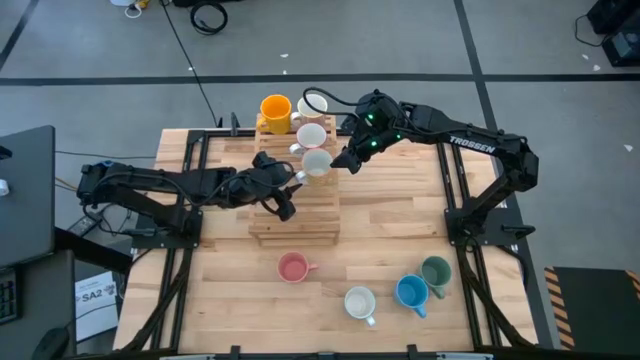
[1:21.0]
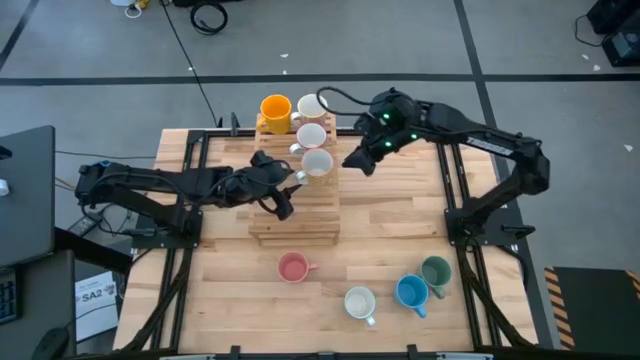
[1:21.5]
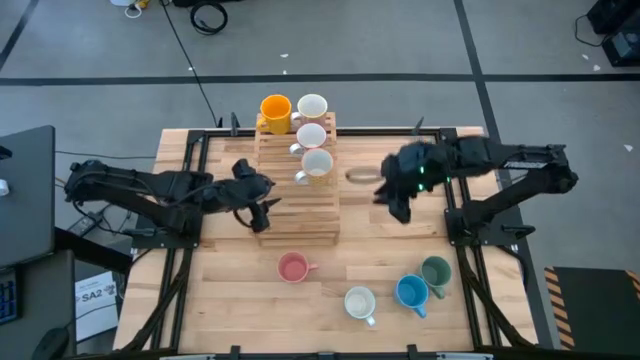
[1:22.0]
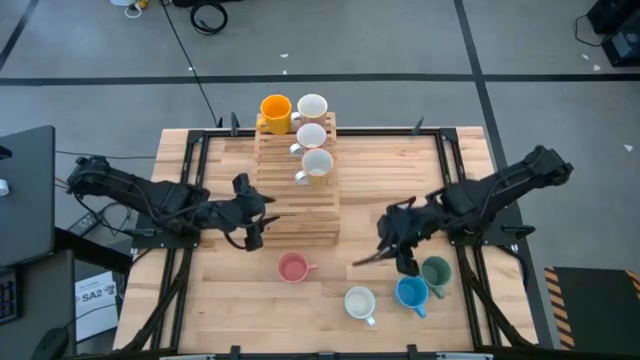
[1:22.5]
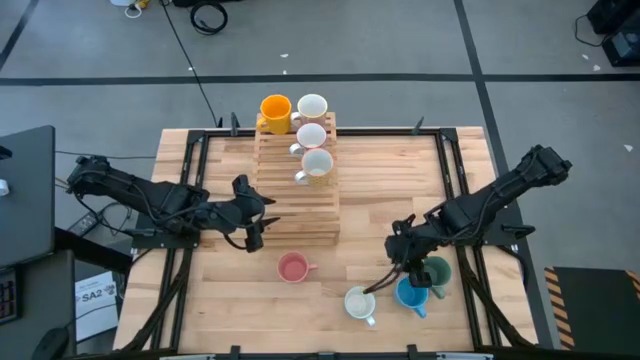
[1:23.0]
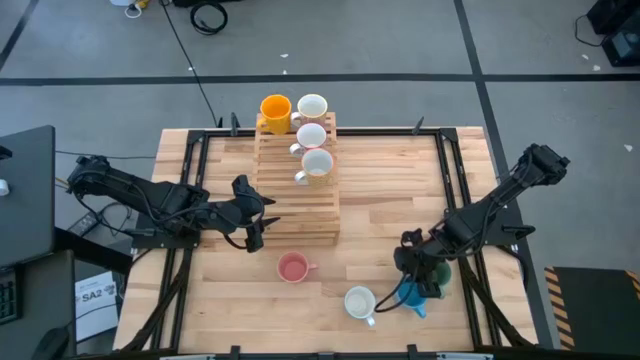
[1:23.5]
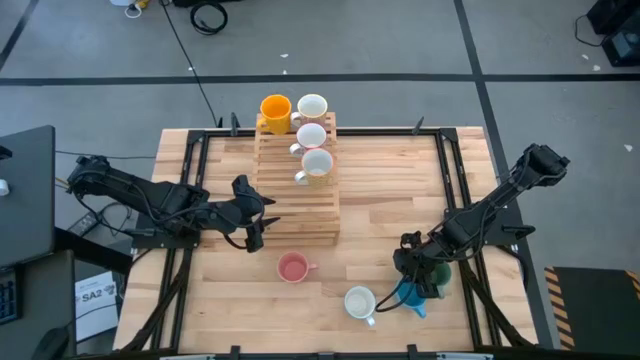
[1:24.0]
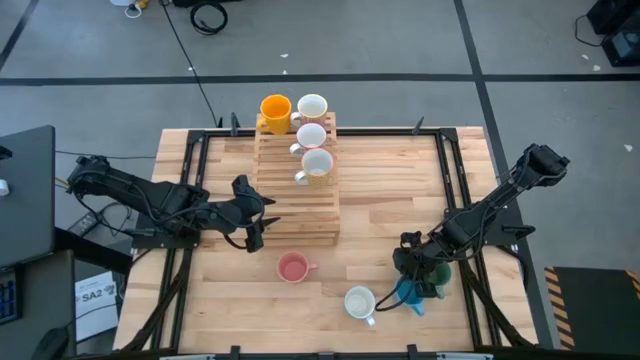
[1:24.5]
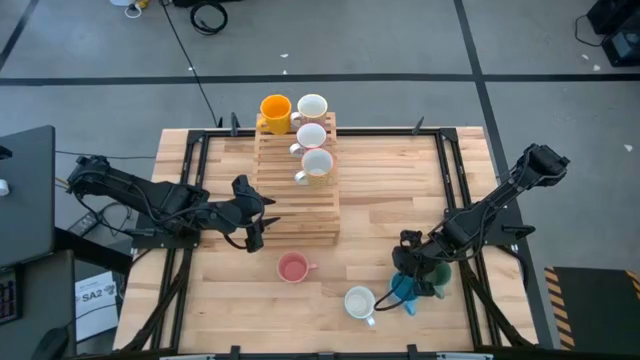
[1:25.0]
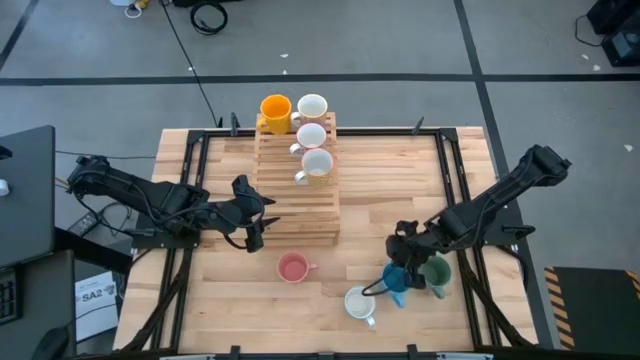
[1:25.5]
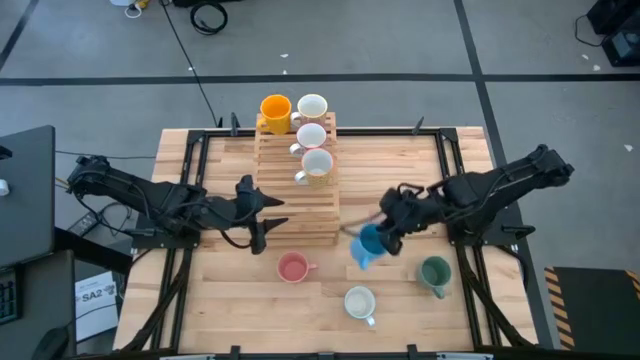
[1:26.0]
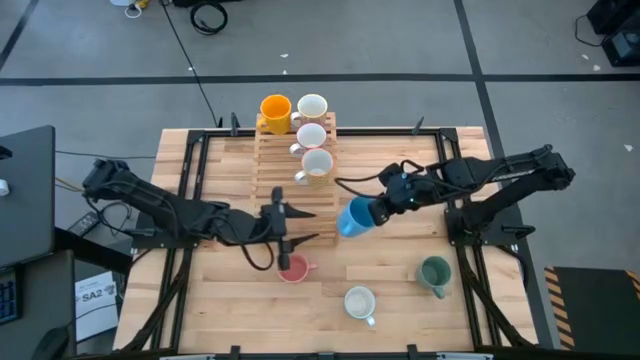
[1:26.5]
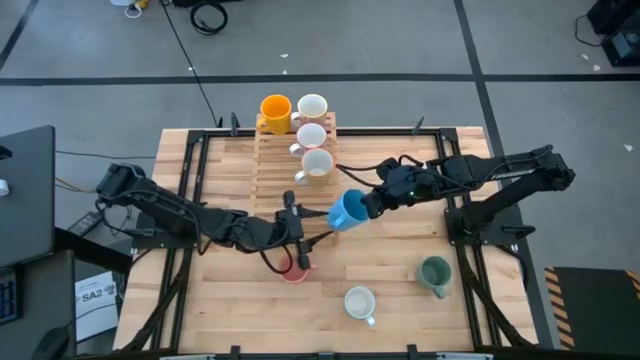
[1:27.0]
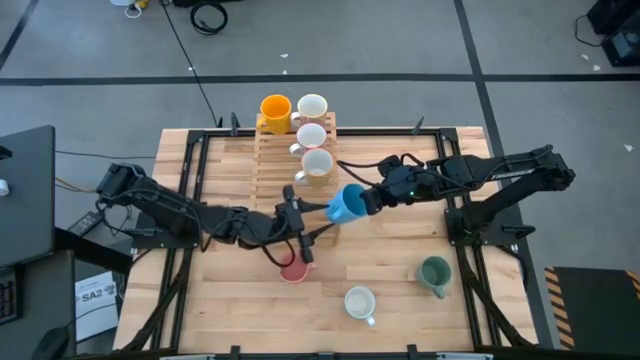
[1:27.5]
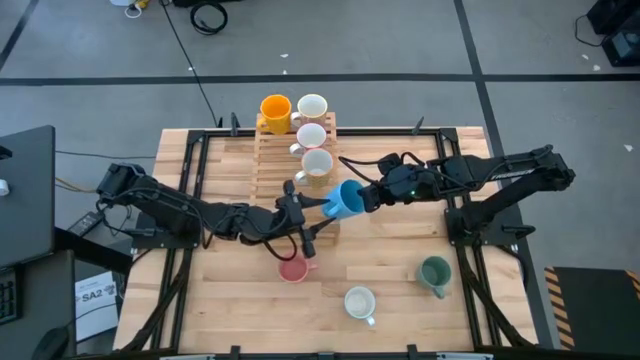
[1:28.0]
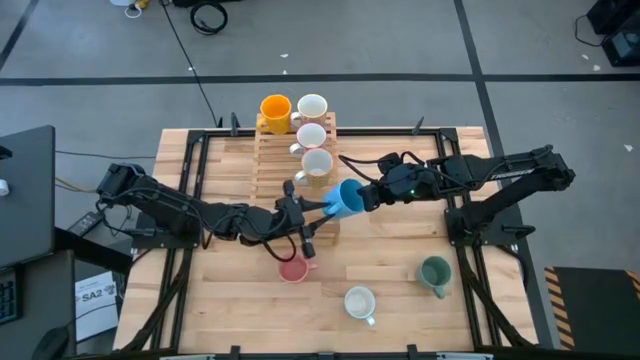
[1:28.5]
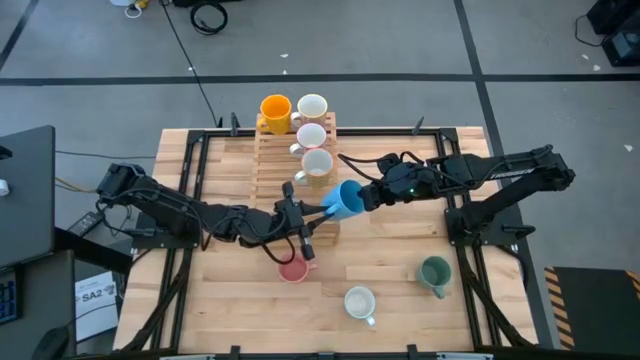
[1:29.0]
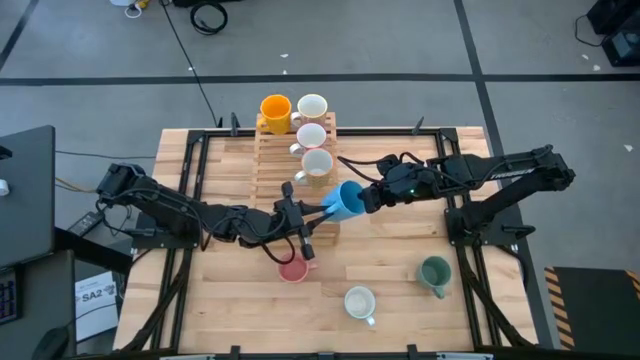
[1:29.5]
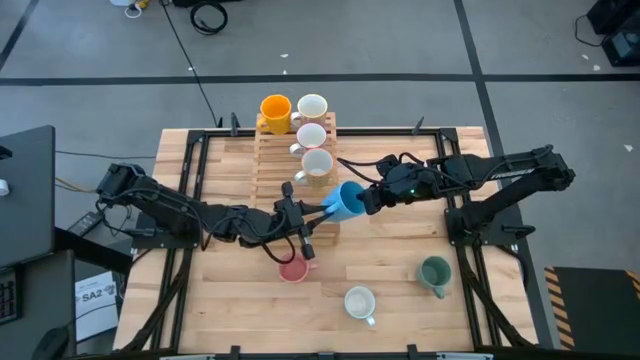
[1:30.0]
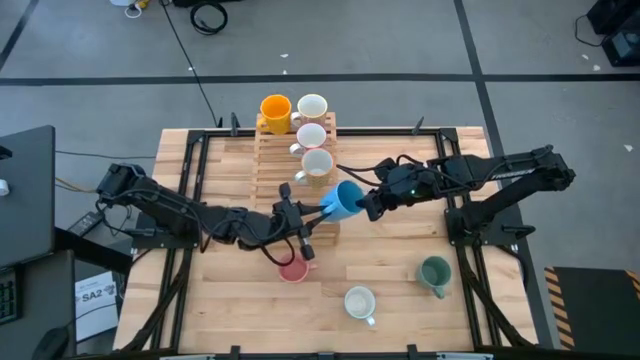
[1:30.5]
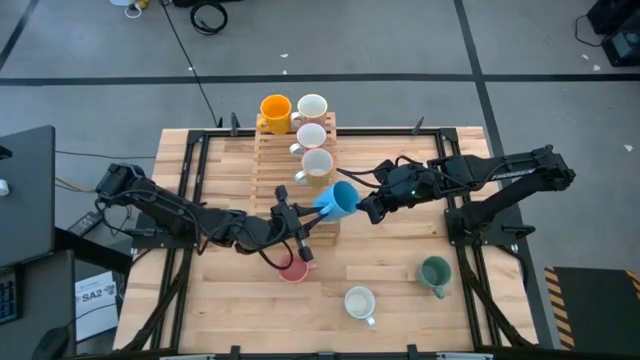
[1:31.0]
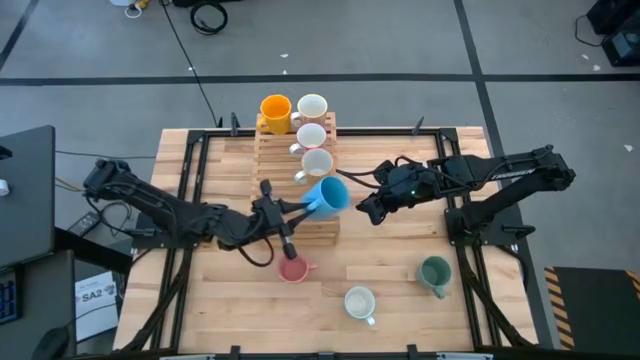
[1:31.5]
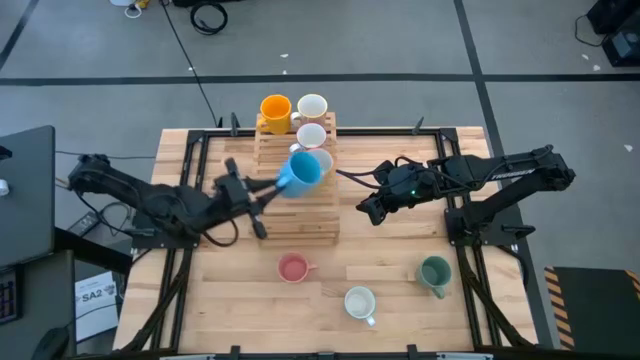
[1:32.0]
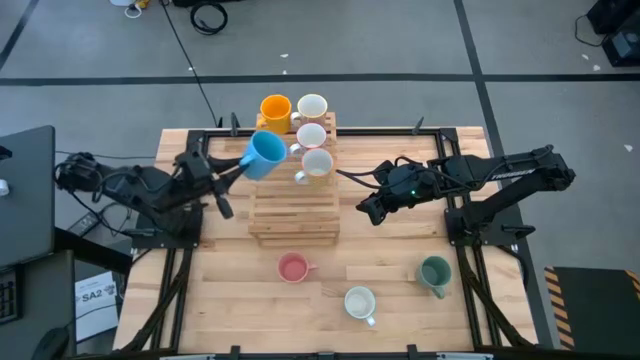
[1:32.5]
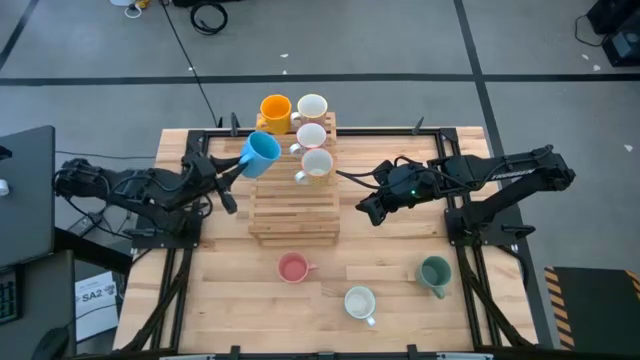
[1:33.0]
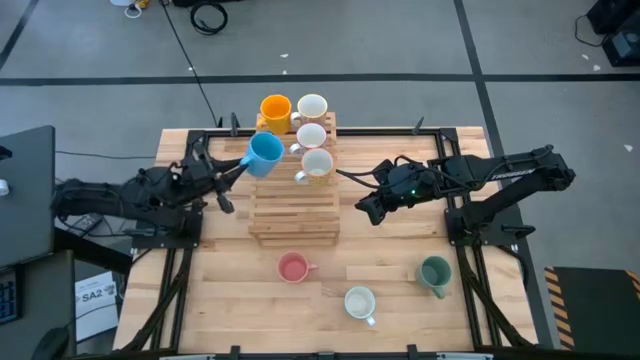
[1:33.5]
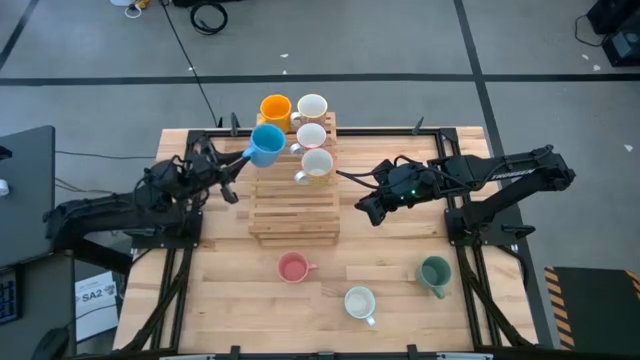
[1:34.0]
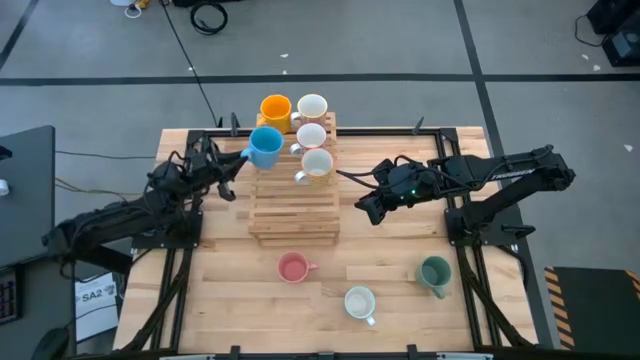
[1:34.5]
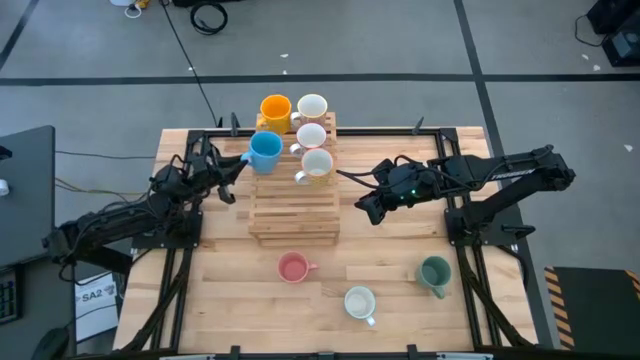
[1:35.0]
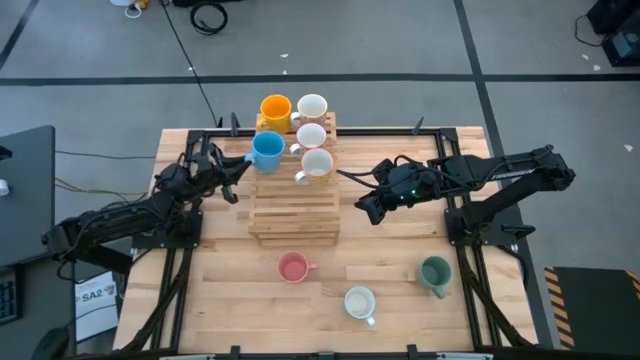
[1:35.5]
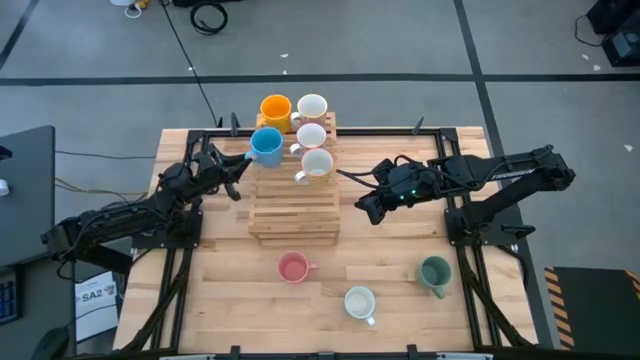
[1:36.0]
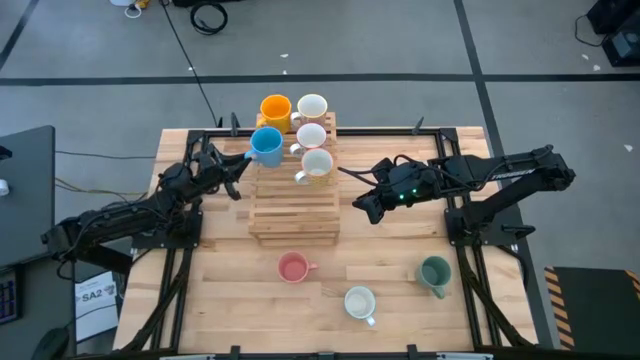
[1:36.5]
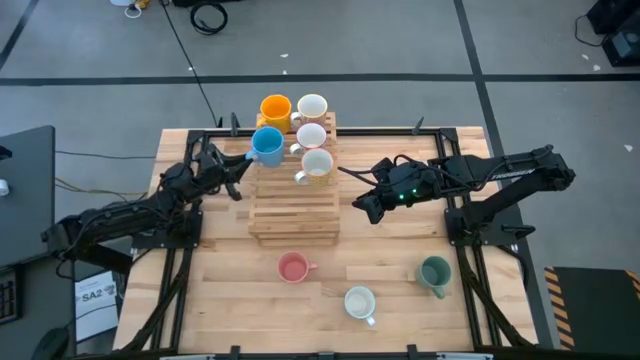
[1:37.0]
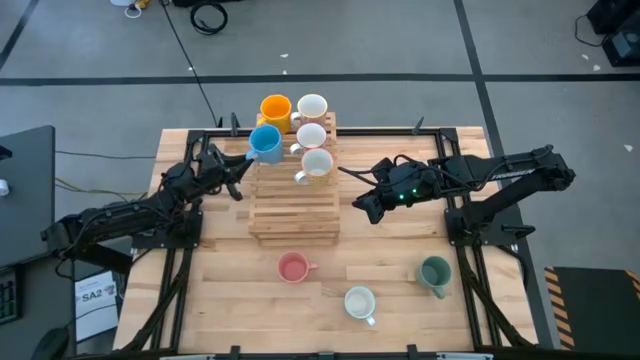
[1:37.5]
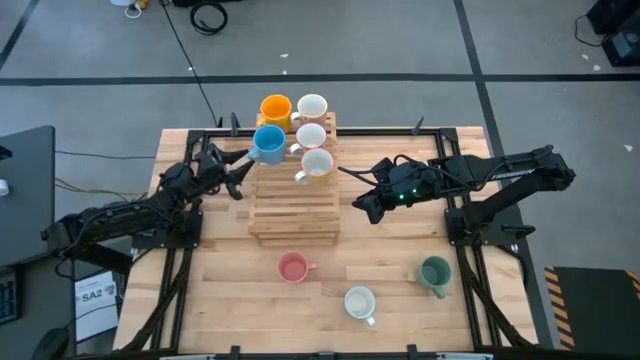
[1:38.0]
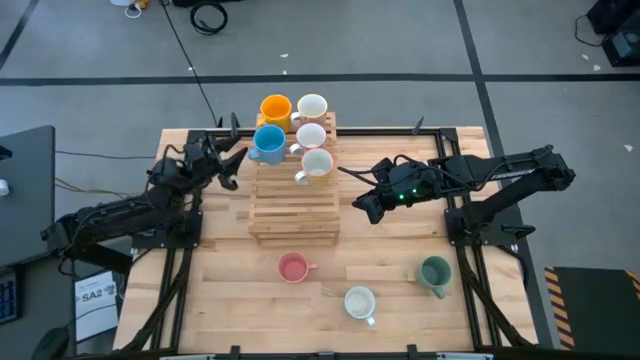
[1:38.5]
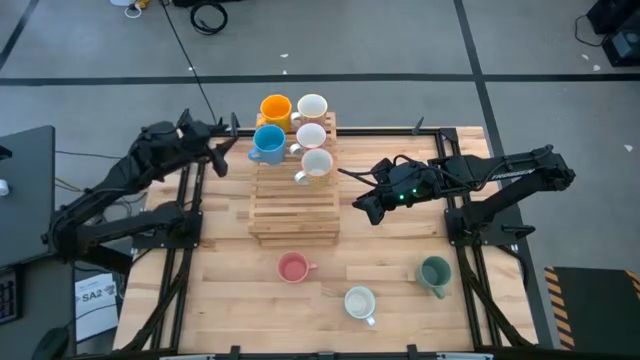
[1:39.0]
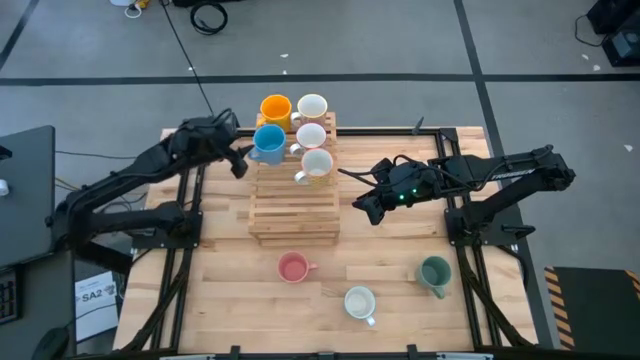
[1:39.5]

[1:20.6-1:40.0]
Task: Place coffee mugs
Put the blue mug on the shelf

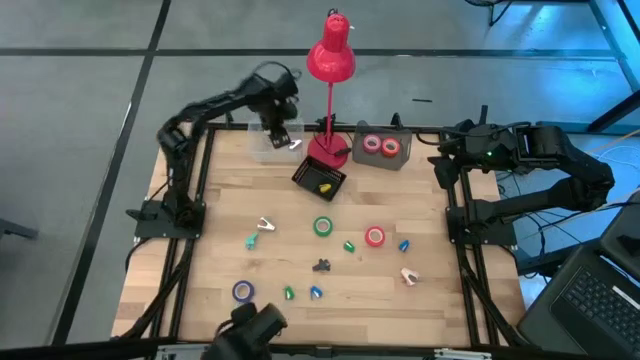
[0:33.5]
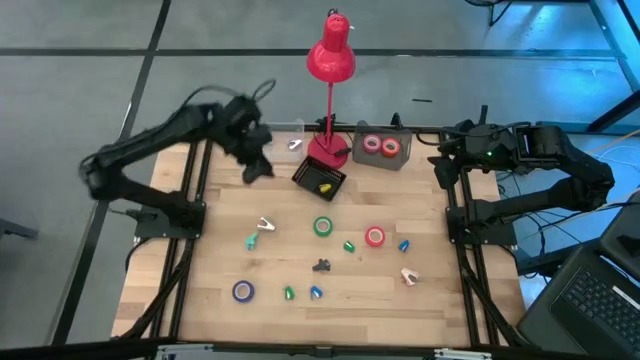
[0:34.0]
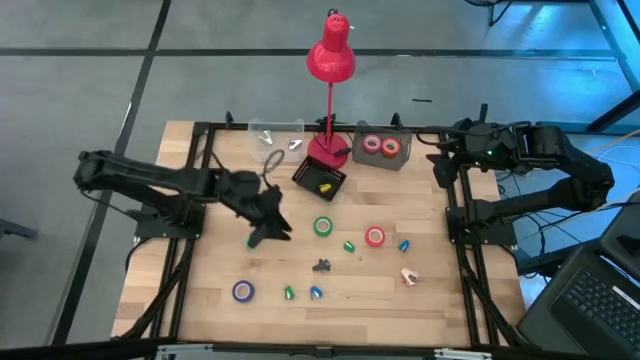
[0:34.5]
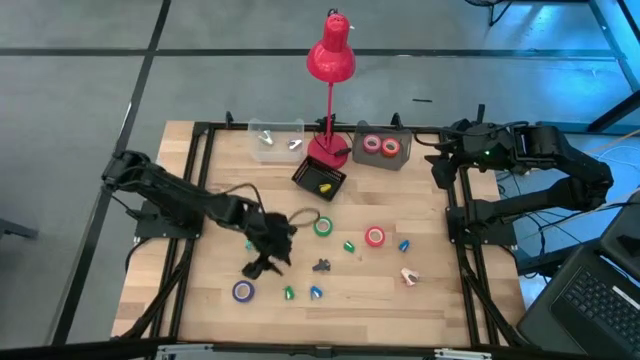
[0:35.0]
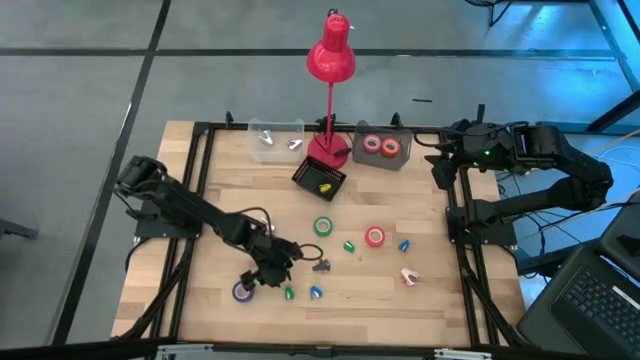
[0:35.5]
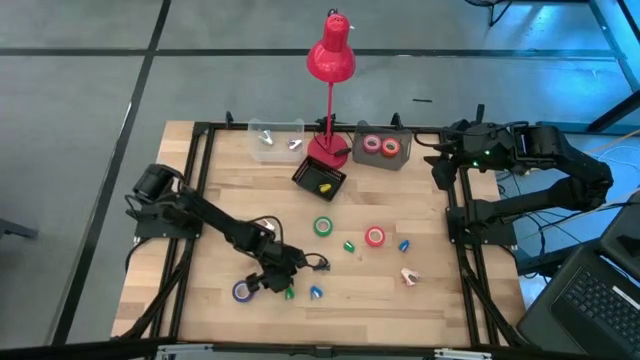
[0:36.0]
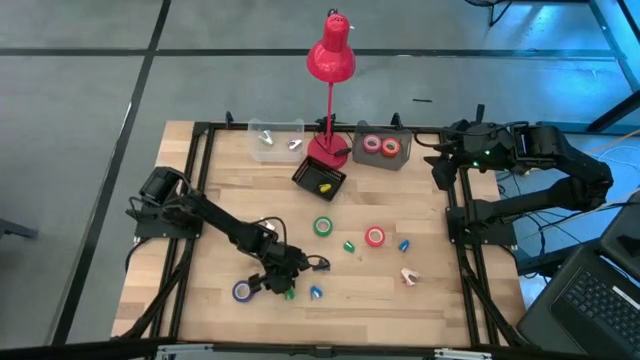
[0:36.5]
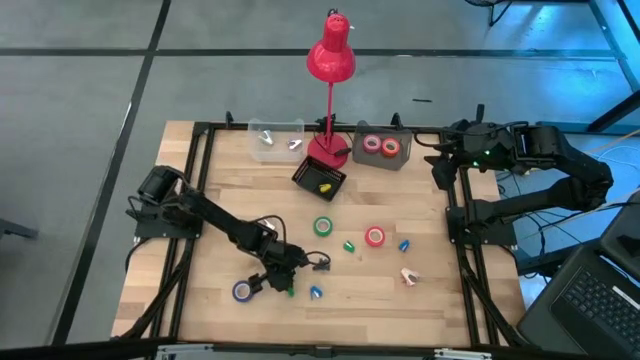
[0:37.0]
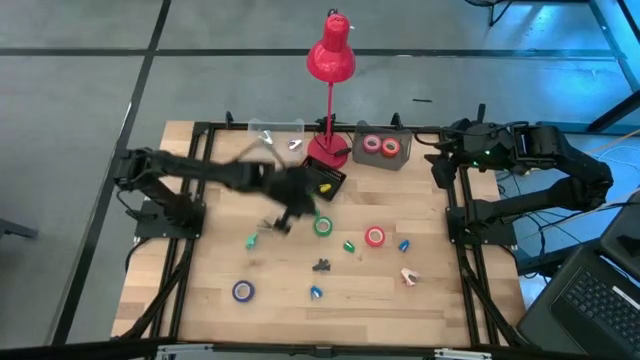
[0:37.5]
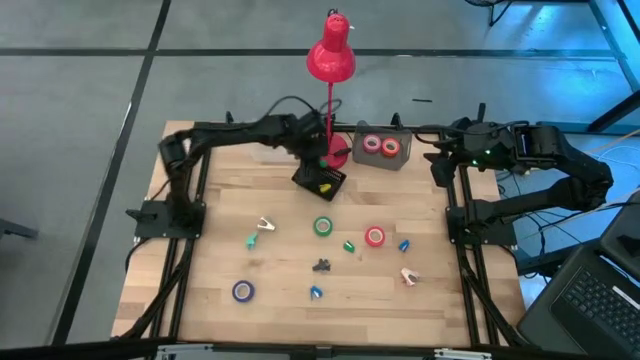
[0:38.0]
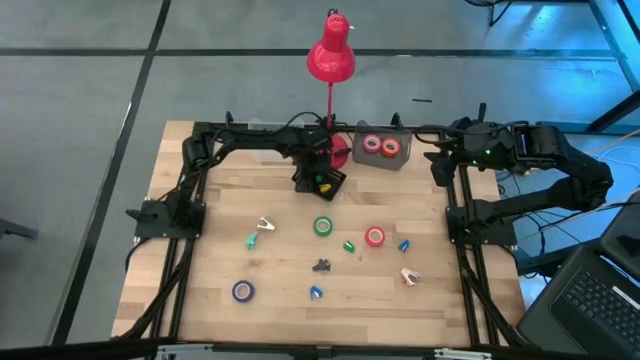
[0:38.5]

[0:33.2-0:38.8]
Task: Pick and place Stapler, Stapler remover, tape
Put the bottom green stapler into the black bin
